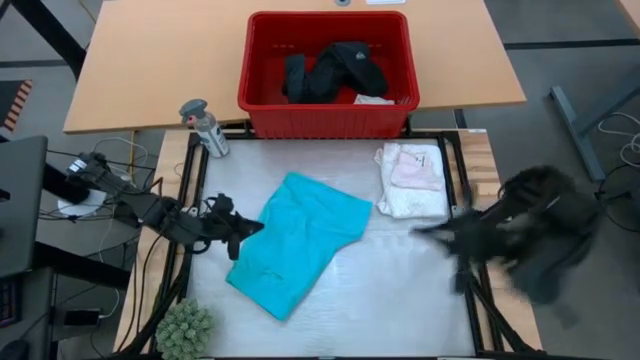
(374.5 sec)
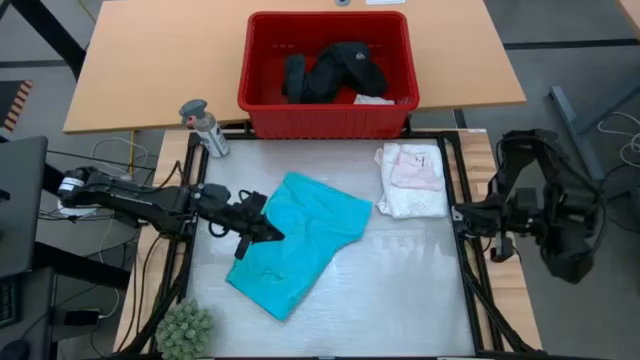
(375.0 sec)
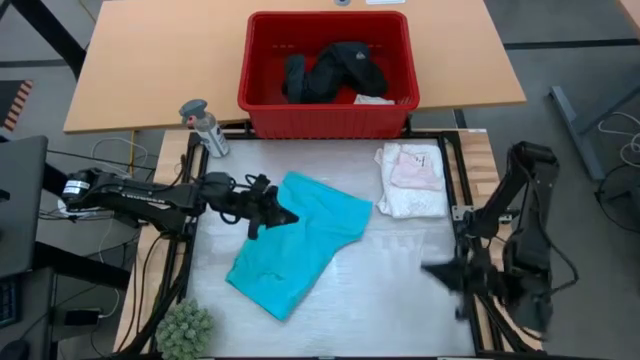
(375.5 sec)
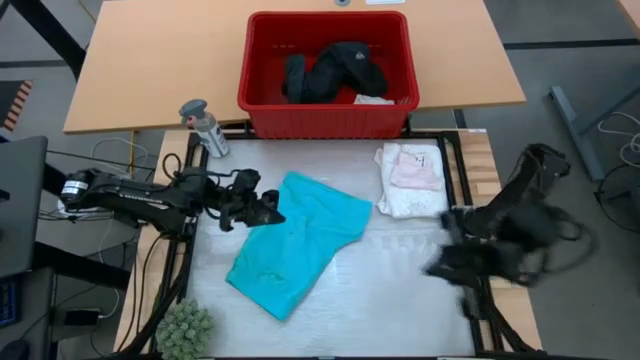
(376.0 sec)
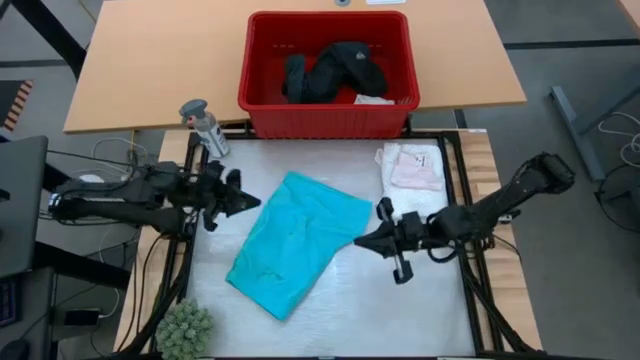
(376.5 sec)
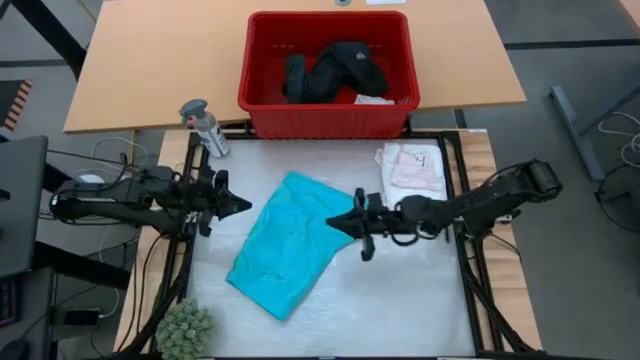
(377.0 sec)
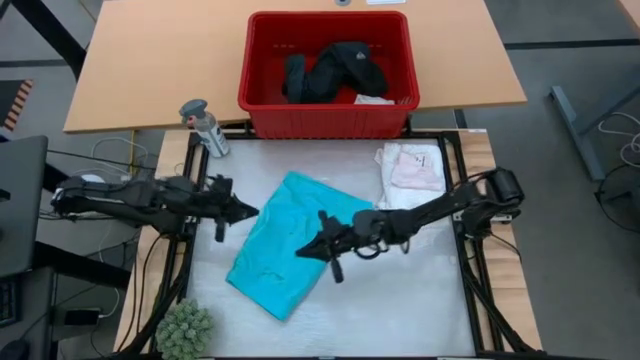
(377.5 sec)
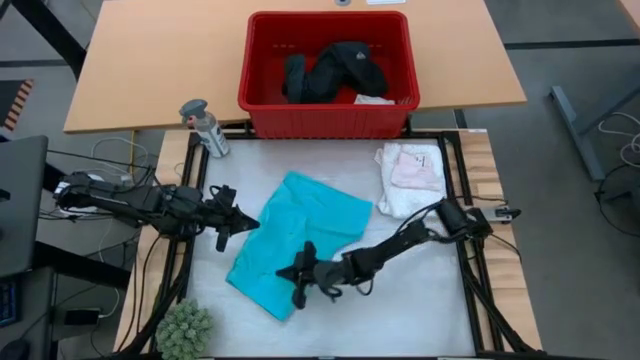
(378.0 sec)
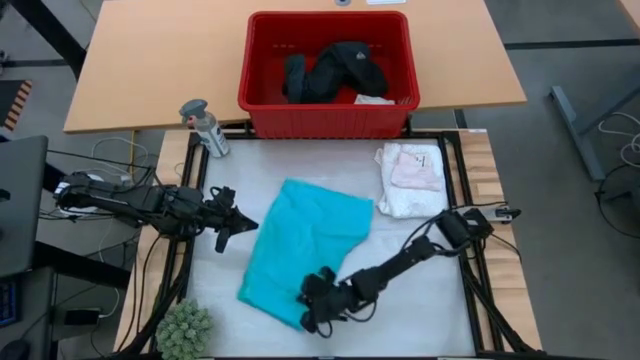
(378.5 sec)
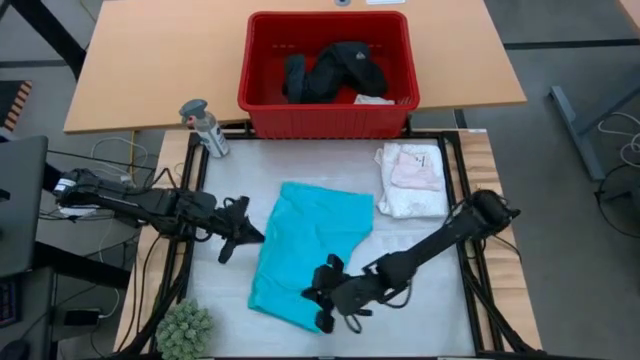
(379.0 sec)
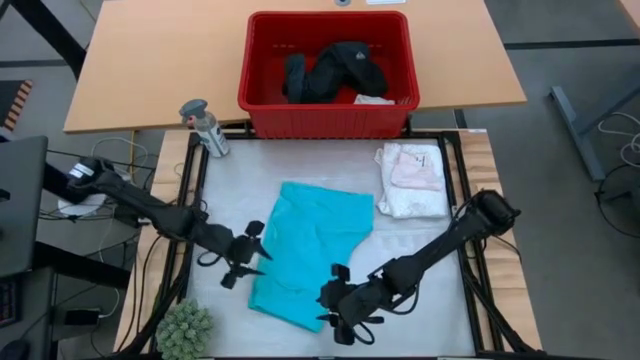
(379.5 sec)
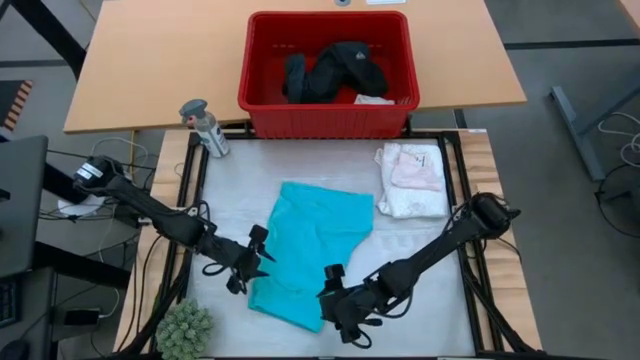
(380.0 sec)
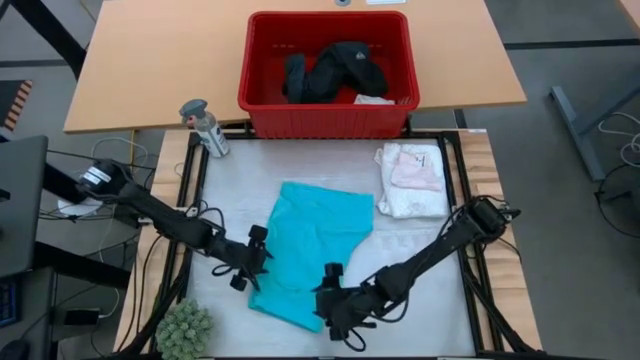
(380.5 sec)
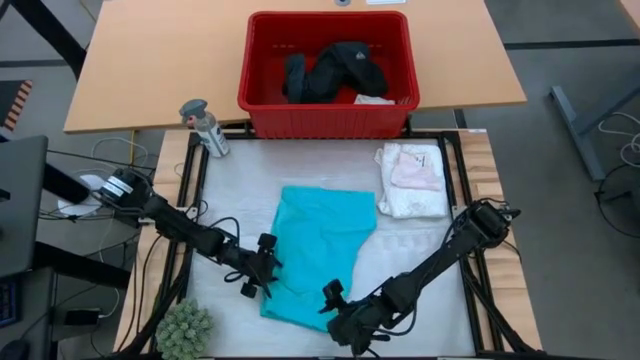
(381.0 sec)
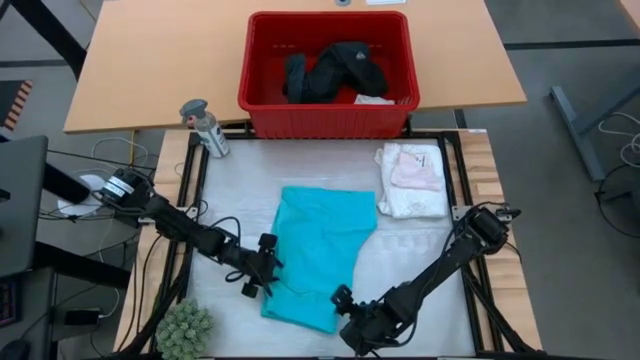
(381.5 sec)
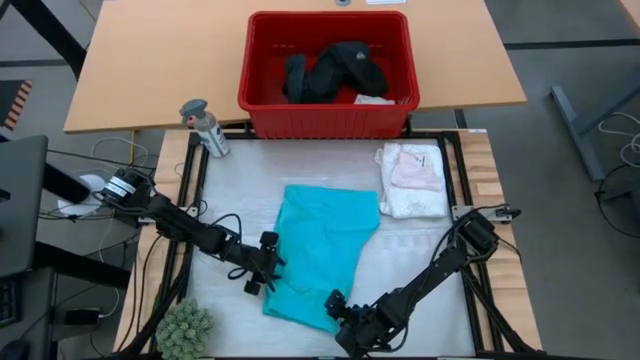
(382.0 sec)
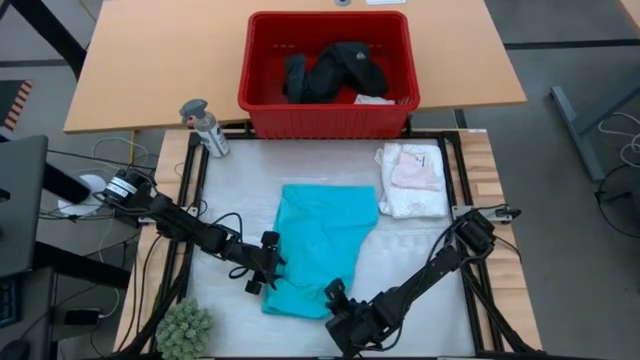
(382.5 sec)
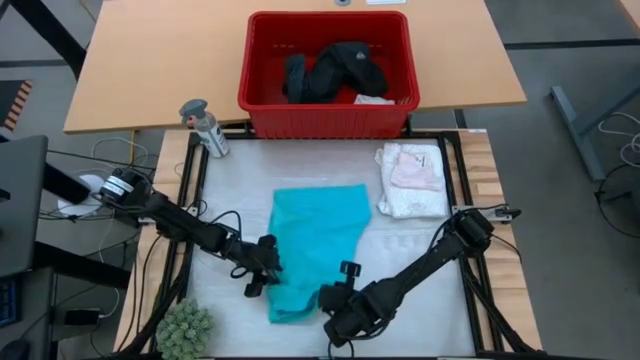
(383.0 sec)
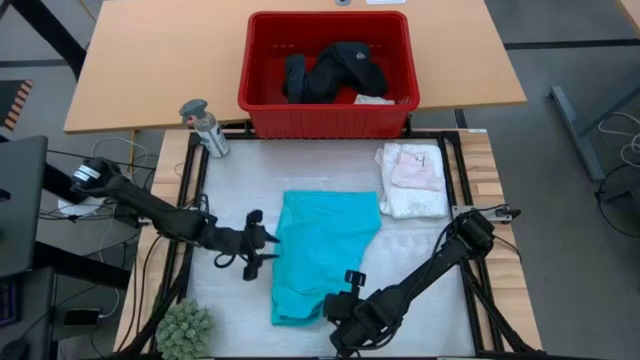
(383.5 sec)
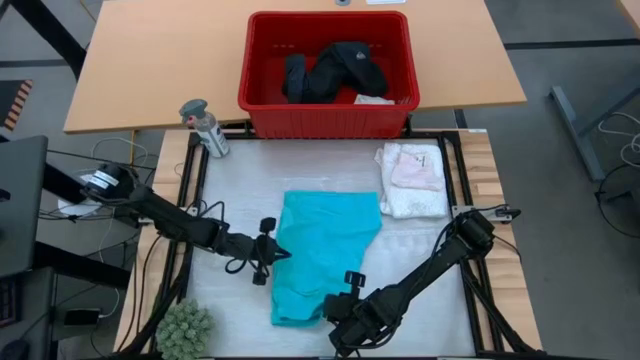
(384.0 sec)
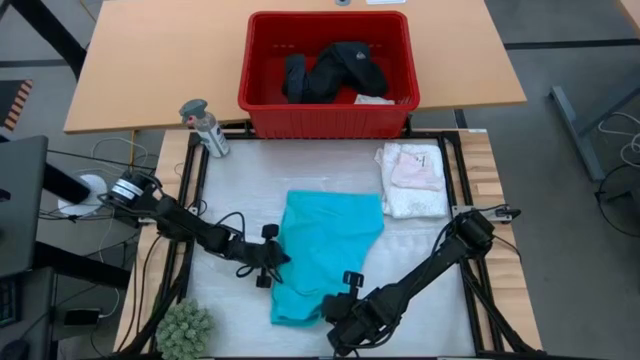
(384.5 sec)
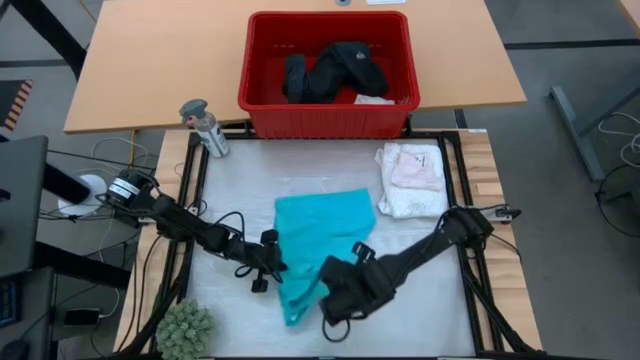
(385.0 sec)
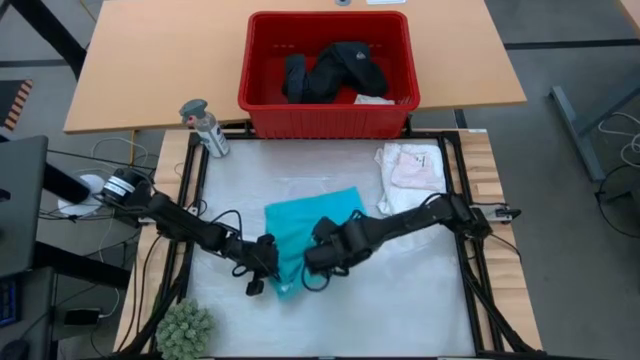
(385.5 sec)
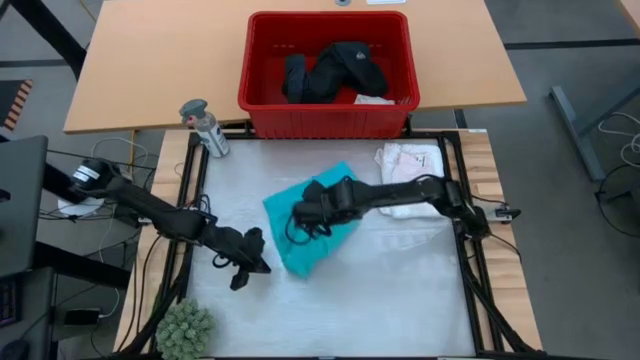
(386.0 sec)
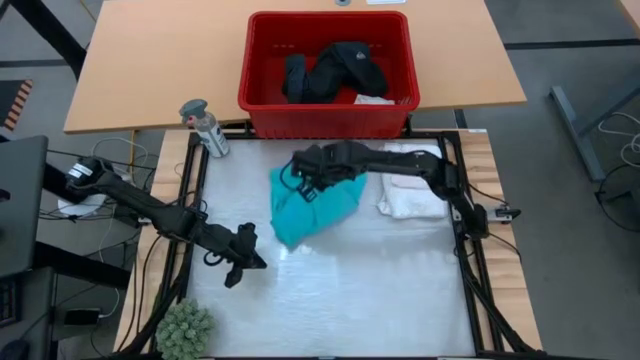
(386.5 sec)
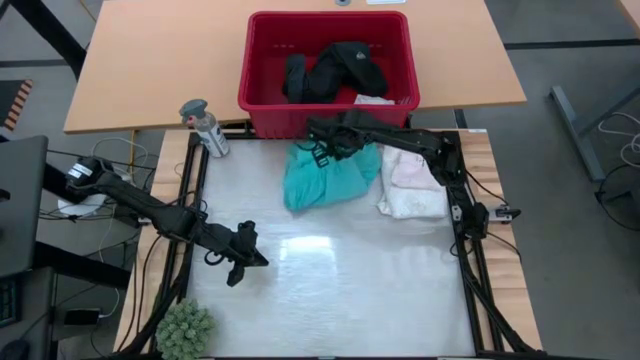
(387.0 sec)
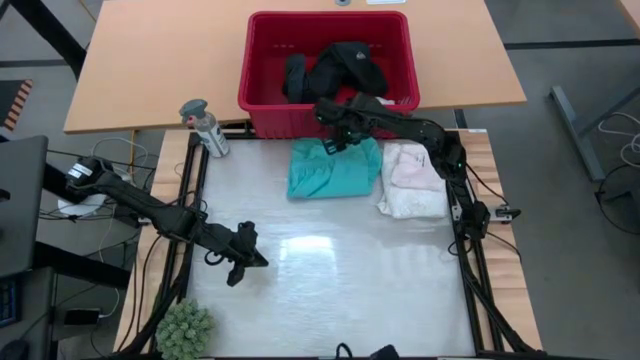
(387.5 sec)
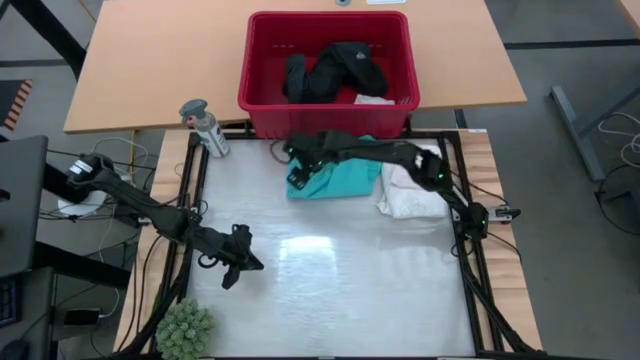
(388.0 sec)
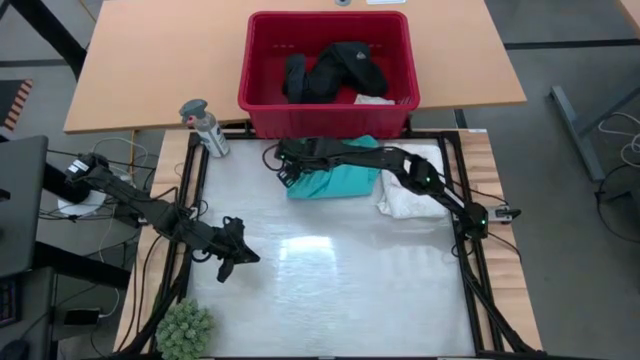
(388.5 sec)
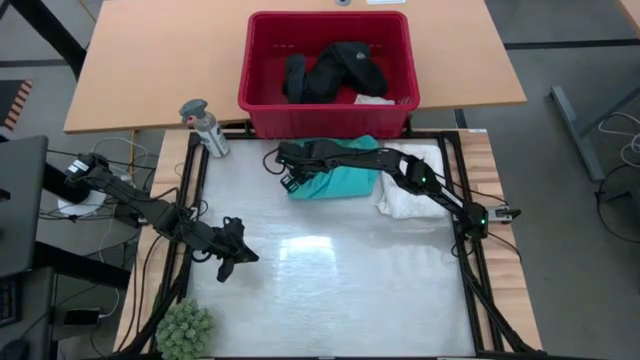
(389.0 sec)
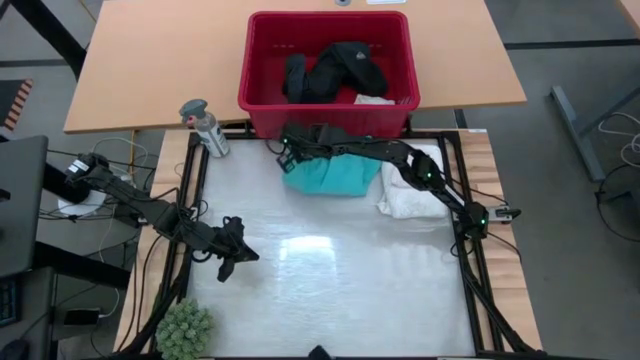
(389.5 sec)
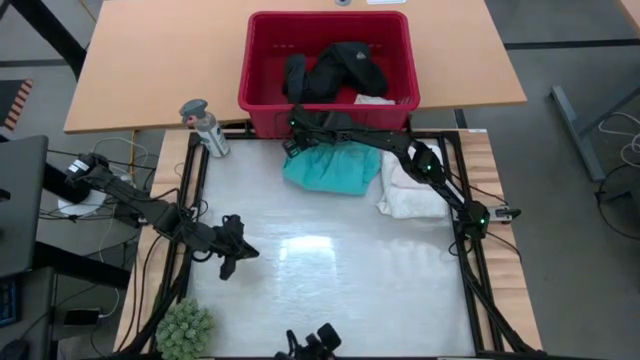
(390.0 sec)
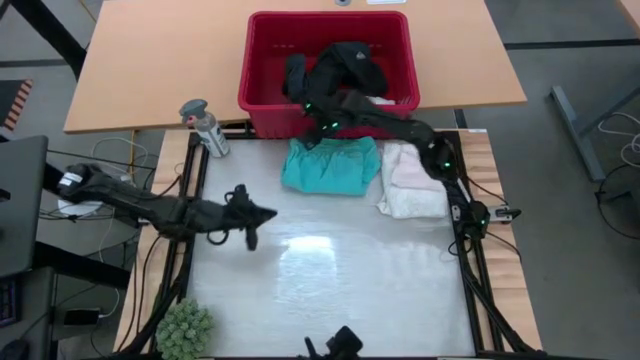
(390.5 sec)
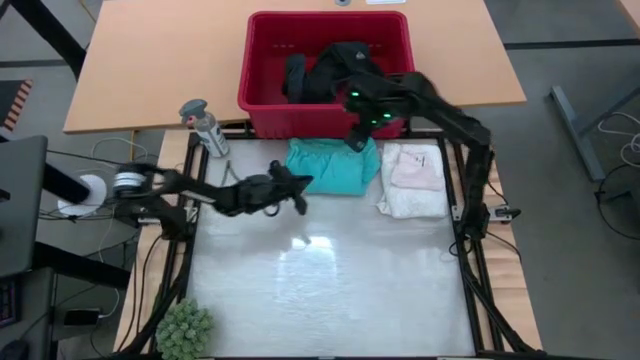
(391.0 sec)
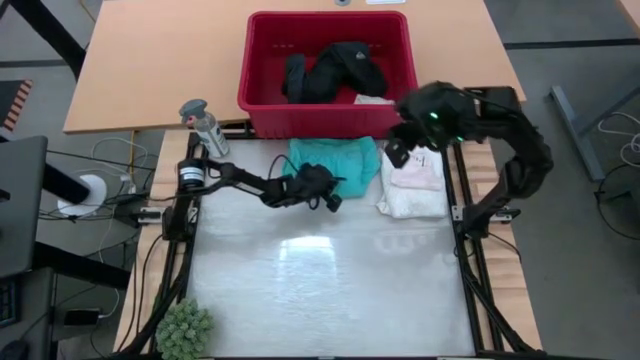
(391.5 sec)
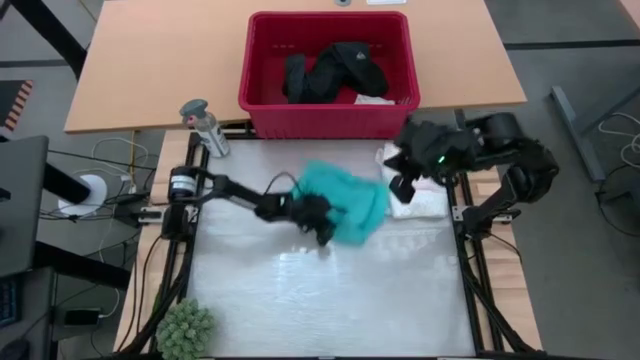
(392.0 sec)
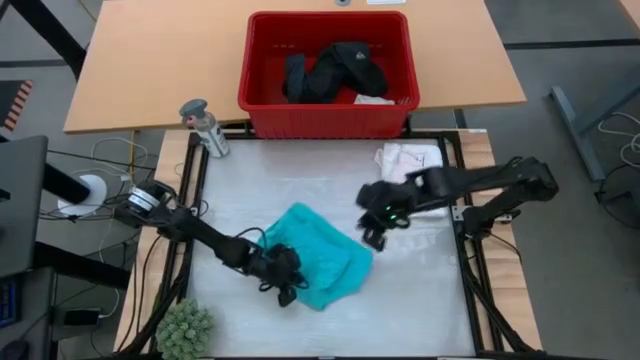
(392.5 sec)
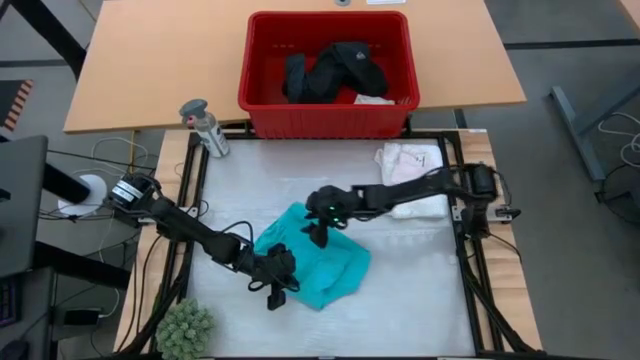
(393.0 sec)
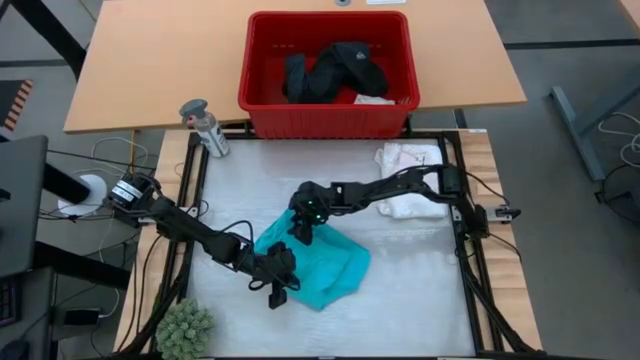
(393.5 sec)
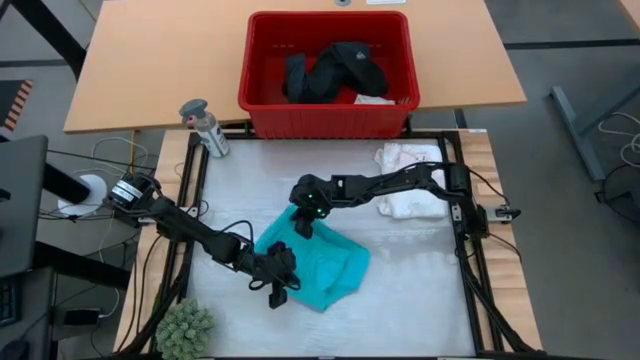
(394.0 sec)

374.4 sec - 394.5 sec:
Task: Fold Laundry from Bin
Fold the light blue shorts
